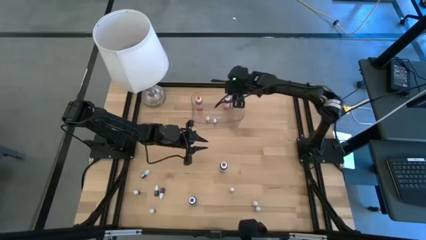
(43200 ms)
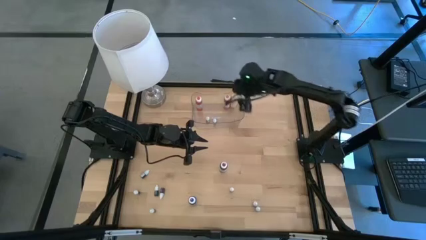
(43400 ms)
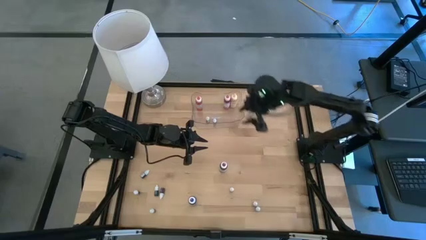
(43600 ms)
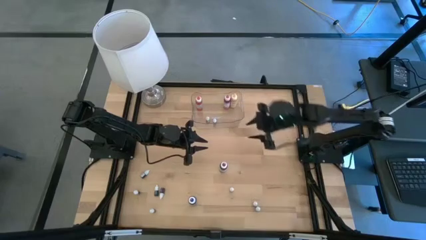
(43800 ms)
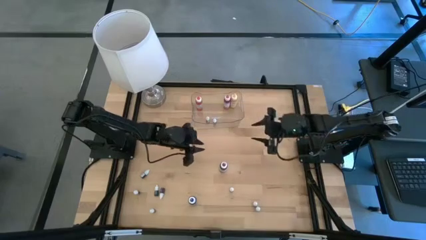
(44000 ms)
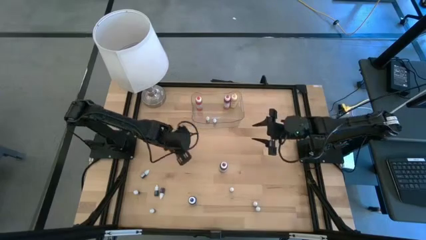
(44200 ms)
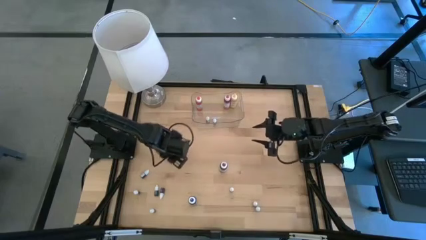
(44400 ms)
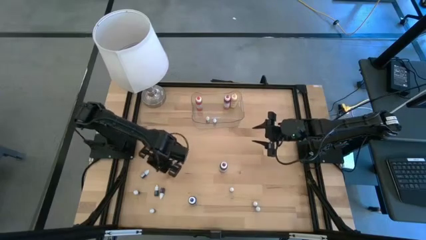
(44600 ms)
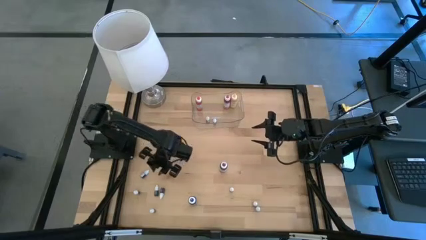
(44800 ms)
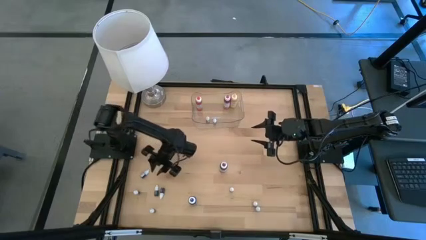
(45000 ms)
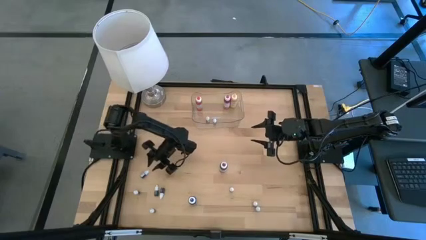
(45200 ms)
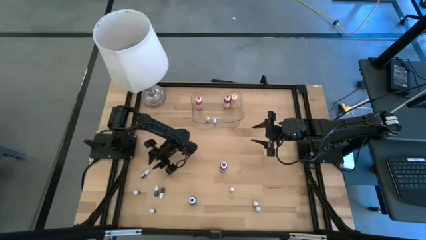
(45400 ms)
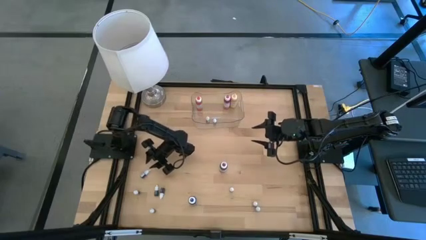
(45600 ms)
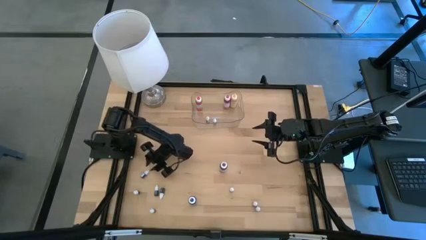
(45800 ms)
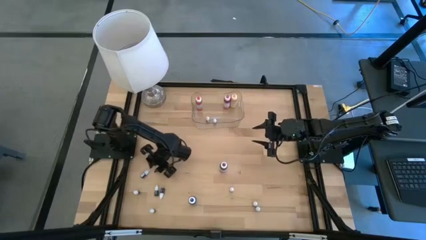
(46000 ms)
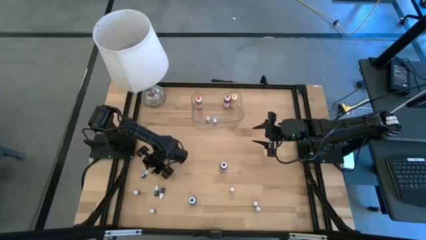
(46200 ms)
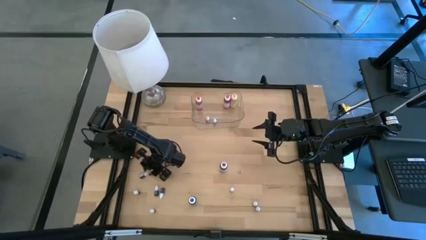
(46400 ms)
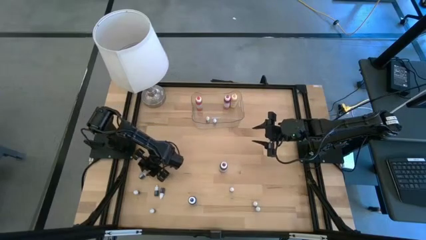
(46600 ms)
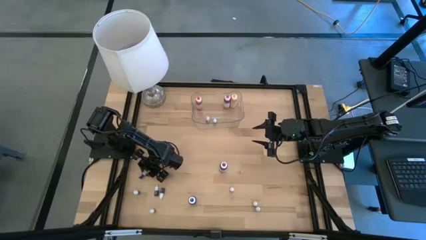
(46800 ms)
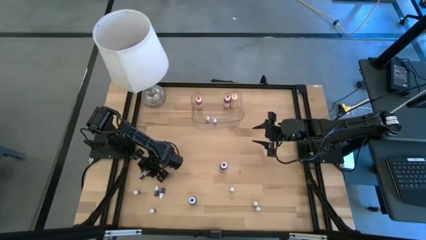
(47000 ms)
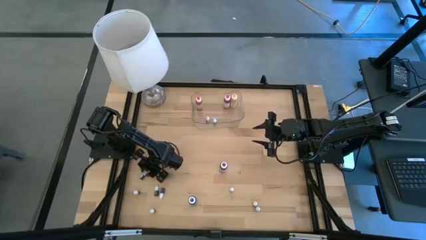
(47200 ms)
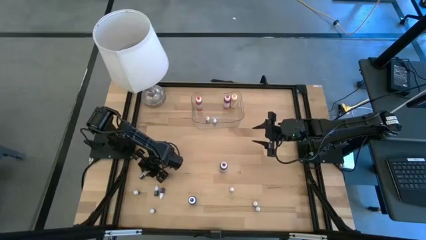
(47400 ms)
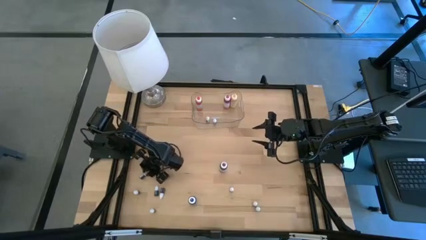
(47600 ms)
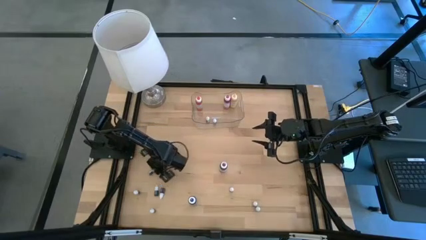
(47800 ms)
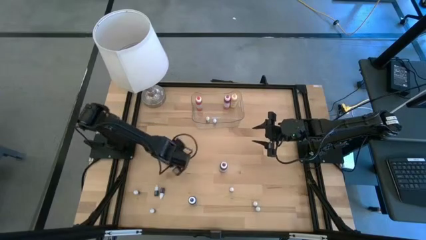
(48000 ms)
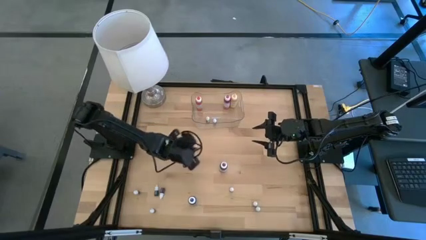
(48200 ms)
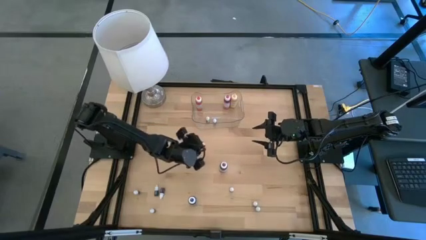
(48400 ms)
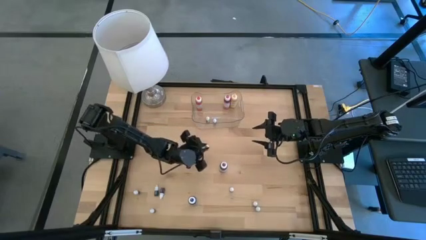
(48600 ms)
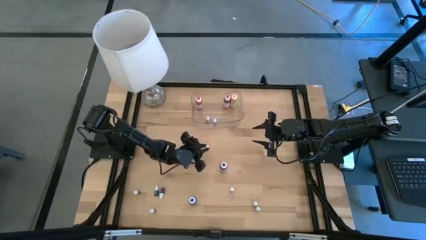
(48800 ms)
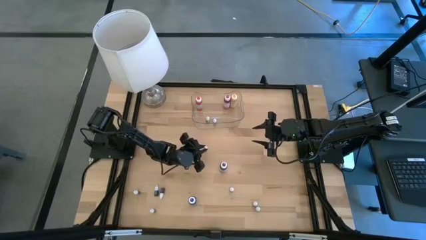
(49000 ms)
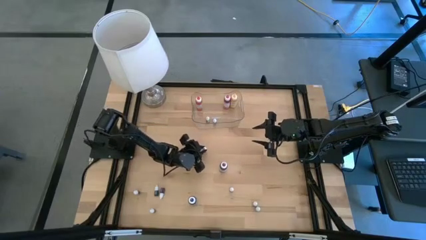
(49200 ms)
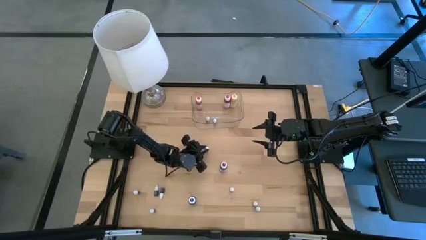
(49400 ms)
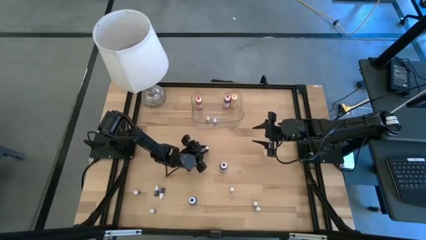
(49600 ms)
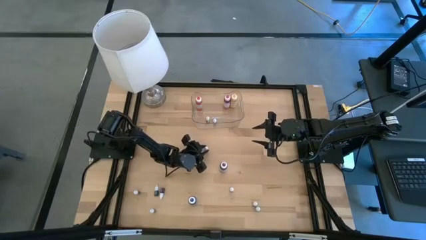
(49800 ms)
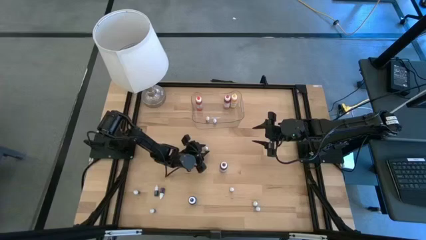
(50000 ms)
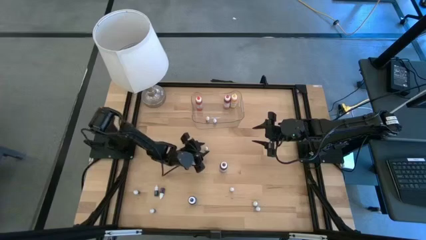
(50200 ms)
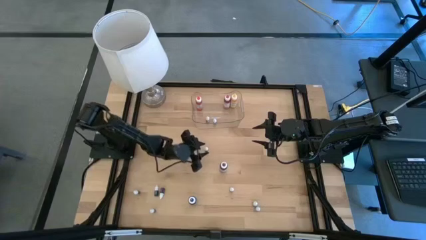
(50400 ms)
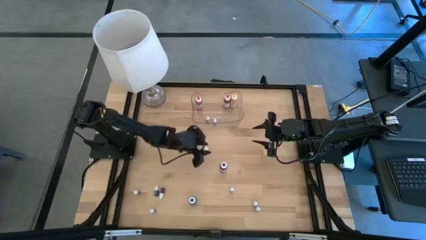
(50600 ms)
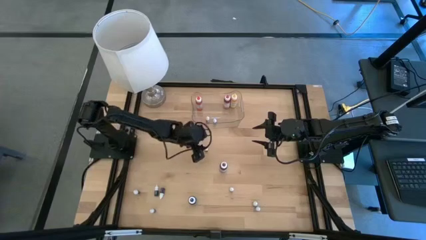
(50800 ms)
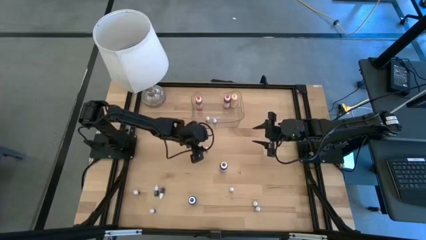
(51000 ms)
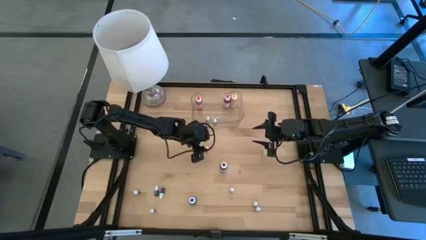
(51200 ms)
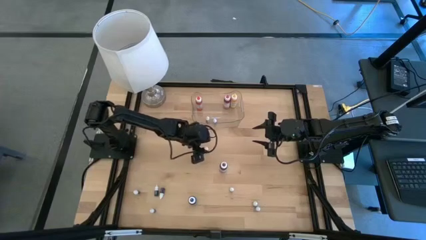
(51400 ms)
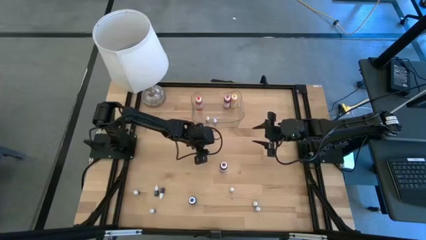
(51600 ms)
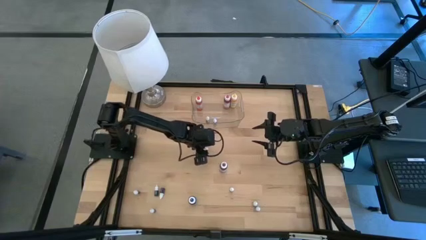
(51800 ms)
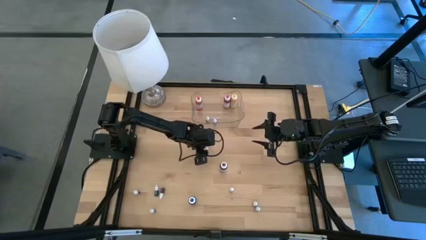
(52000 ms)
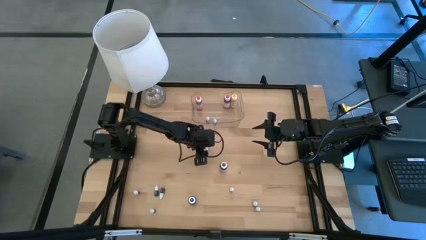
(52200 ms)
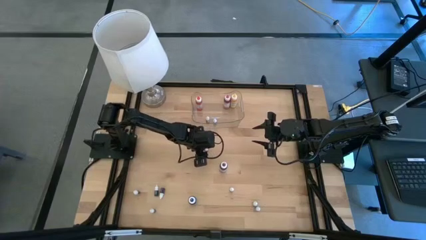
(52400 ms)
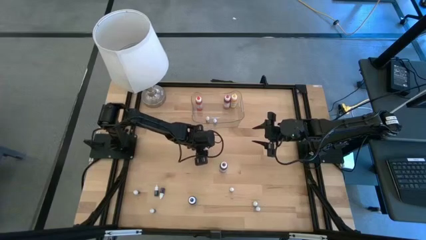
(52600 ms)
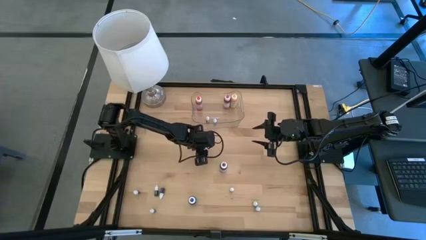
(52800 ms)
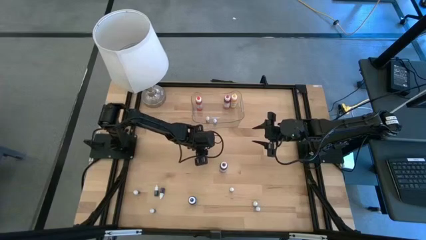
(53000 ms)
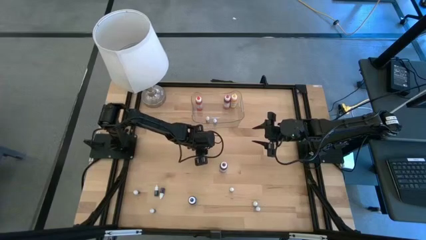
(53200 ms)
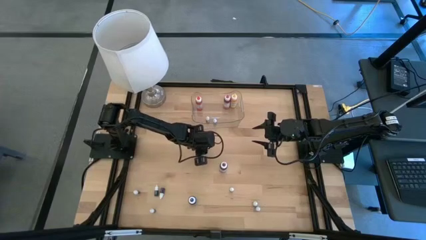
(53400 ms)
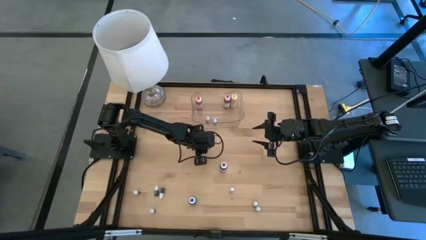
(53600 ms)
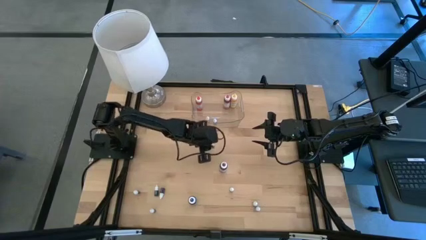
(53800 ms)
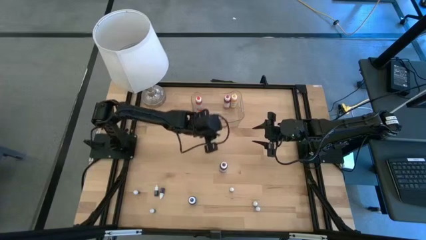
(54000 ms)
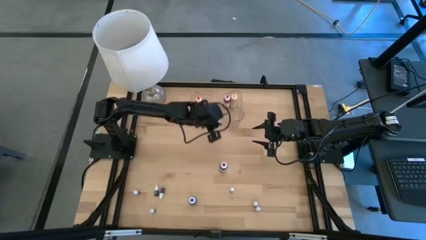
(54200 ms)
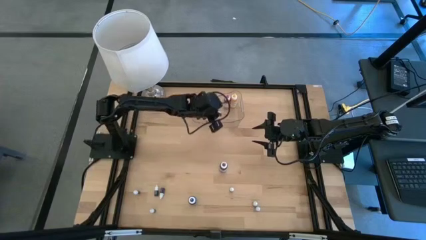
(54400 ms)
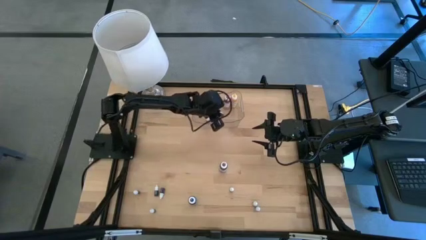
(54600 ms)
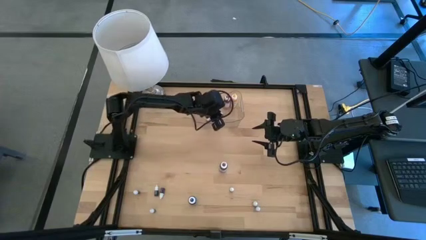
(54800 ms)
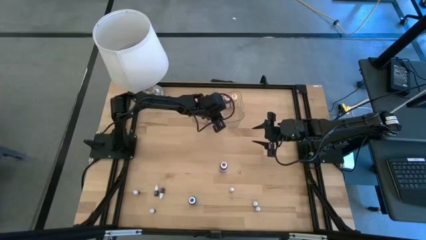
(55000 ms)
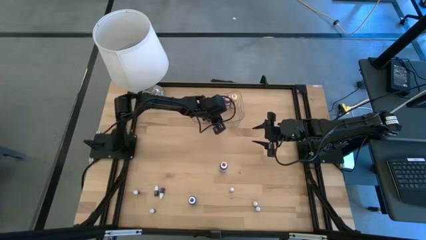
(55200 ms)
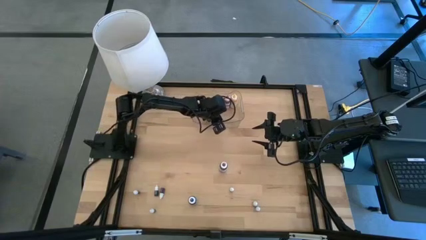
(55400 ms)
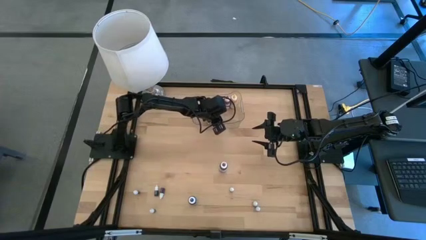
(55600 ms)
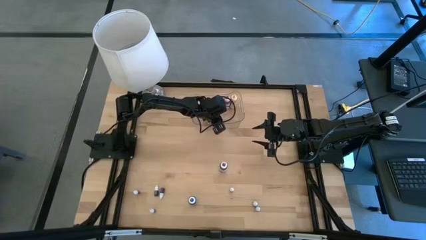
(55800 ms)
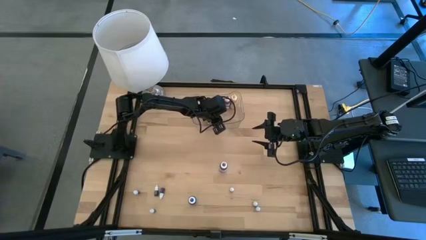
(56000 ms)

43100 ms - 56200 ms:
Task: Pick & Place food coloring
Put the top small blue food coloring bottle into the transparent bin

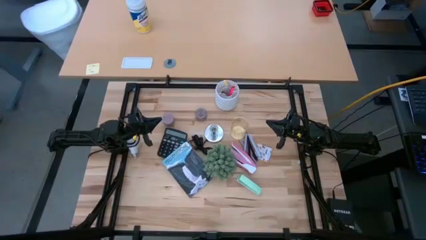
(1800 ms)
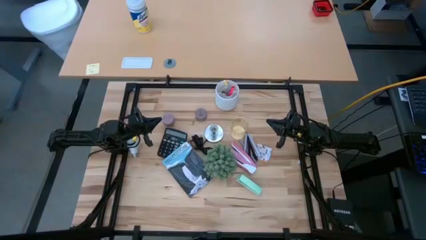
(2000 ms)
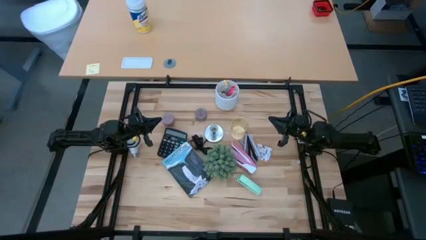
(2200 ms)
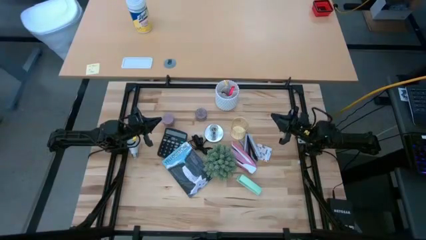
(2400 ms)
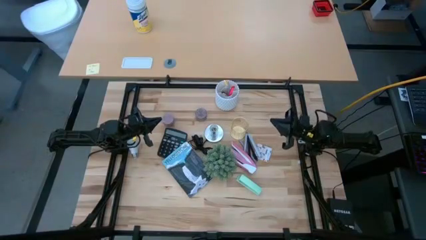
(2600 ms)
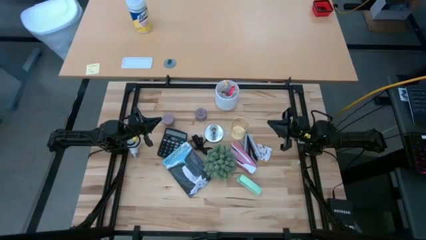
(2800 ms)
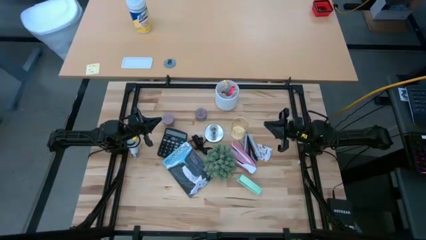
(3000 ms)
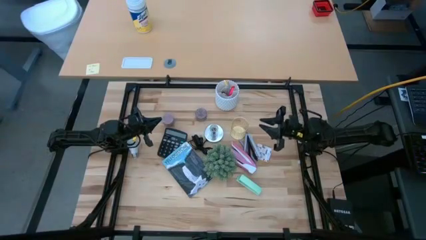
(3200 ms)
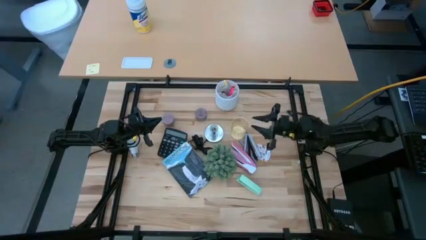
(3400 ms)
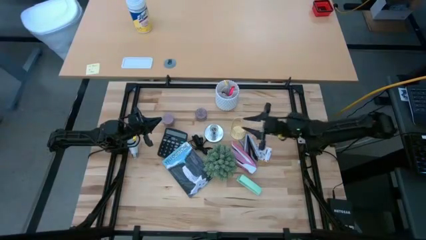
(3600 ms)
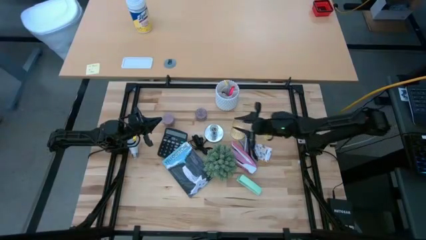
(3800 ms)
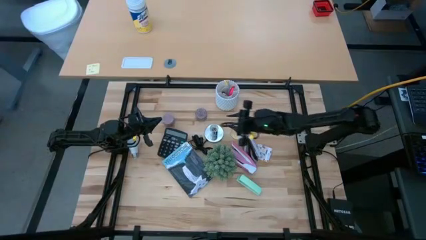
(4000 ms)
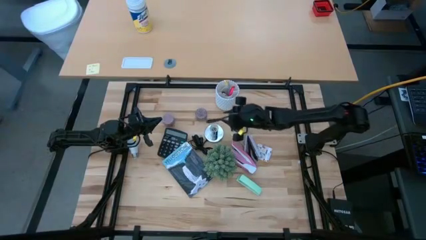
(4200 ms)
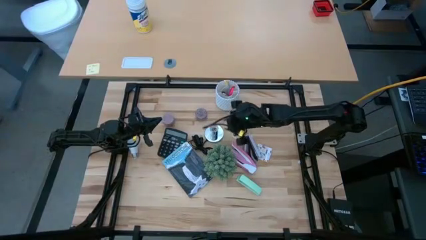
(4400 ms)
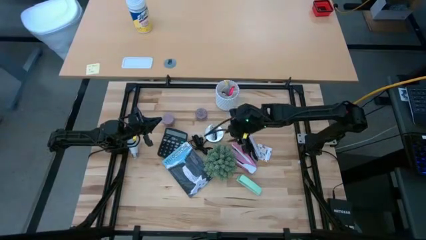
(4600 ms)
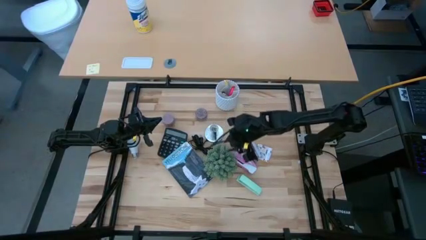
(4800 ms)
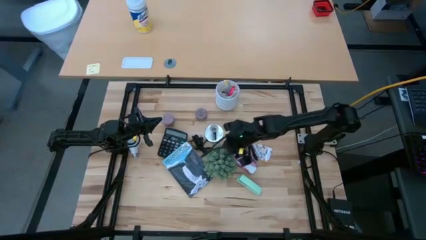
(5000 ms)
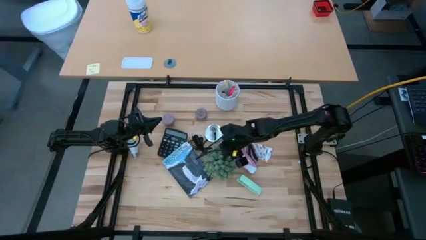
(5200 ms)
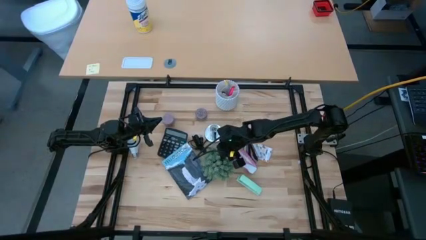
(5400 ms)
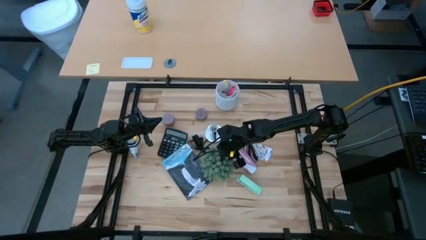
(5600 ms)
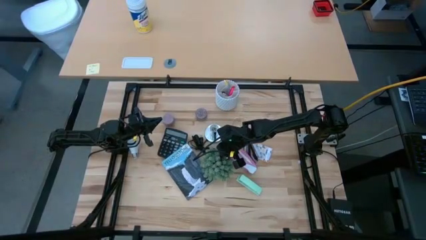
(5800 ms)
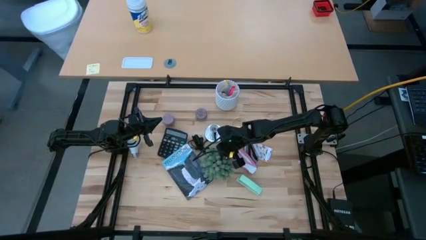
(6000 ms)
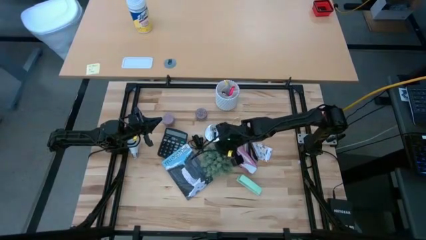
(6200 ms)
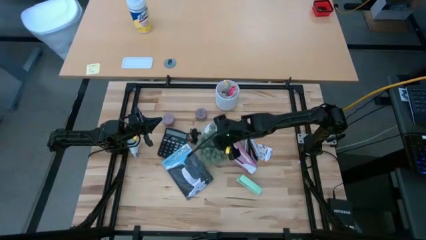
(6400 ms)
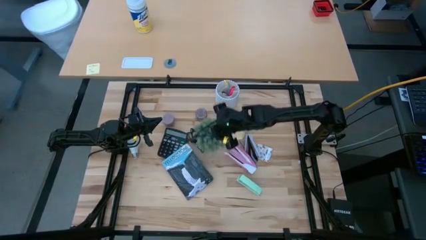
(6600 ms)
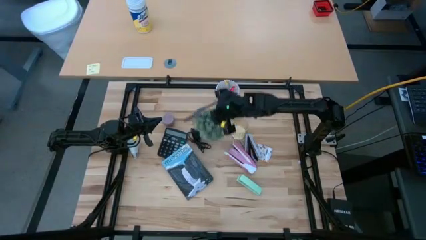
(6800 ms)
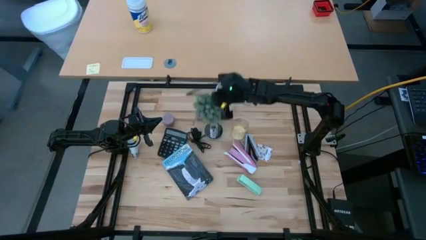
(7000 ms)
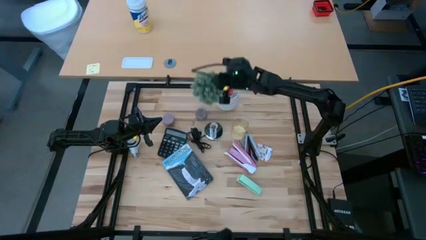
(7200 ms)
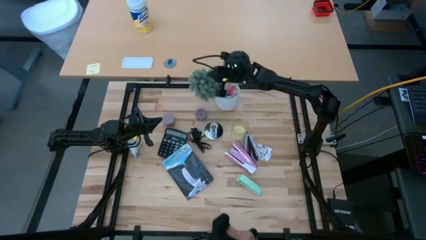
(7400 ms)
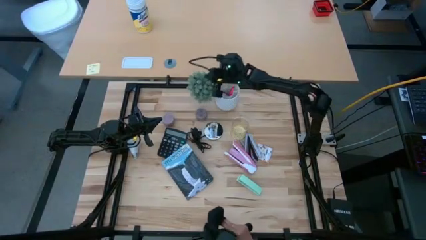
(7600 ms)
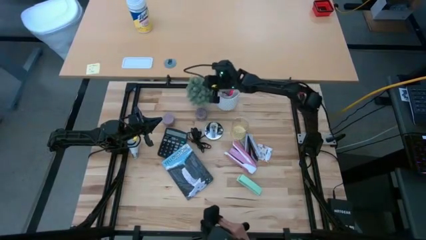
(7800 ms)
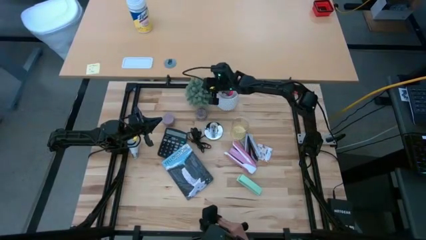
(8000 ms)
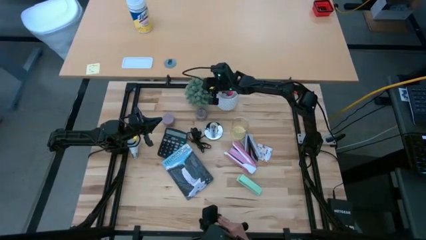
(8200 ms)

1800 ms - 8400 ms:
Task: Screw lightbulb
Put the plant on the top
